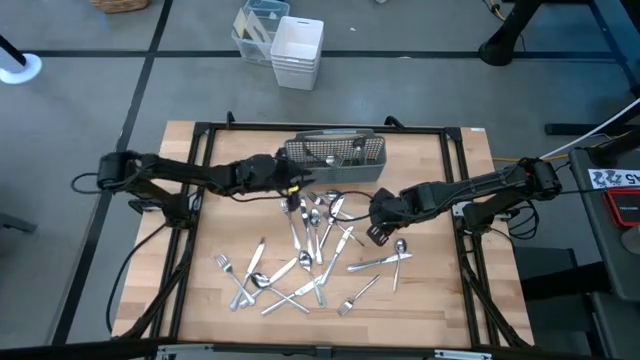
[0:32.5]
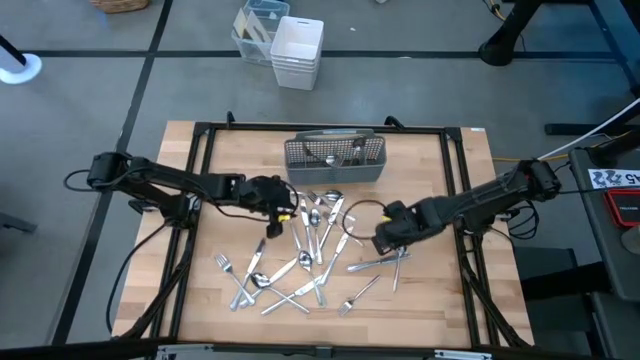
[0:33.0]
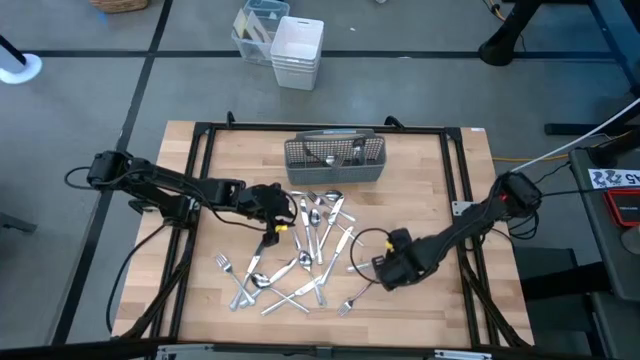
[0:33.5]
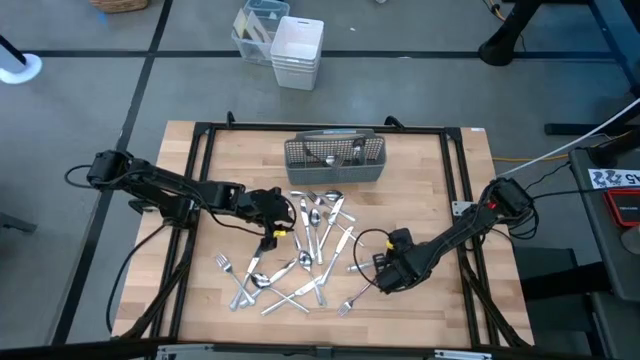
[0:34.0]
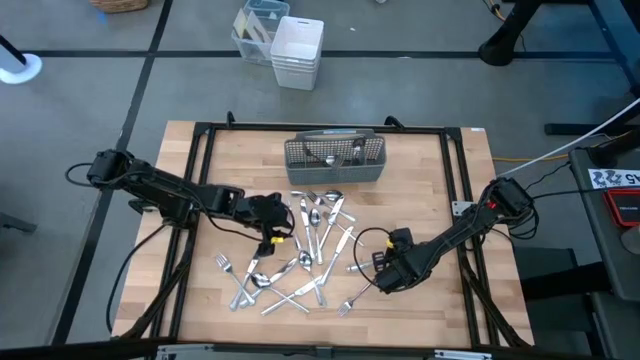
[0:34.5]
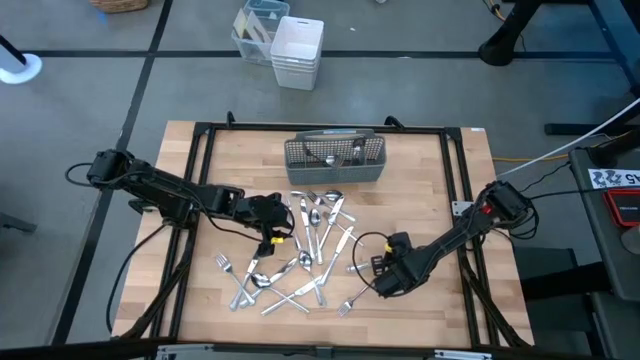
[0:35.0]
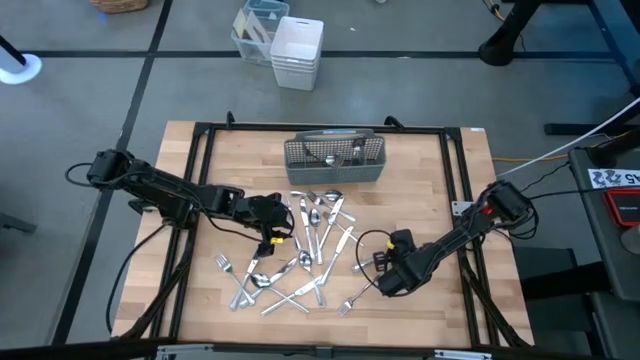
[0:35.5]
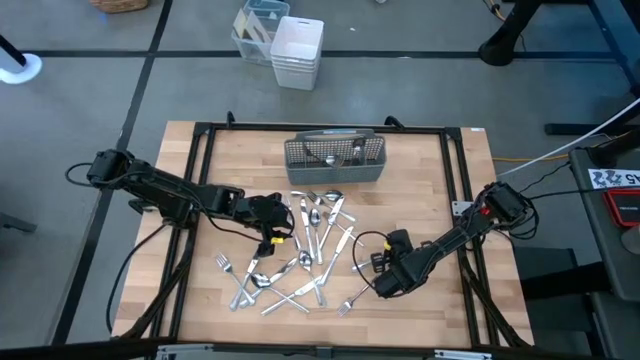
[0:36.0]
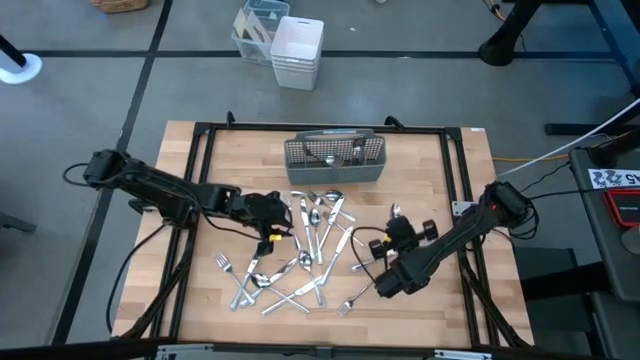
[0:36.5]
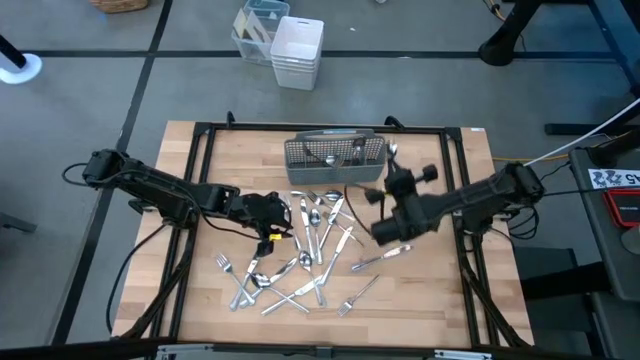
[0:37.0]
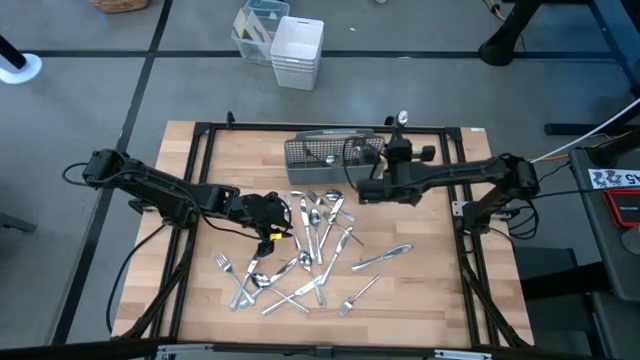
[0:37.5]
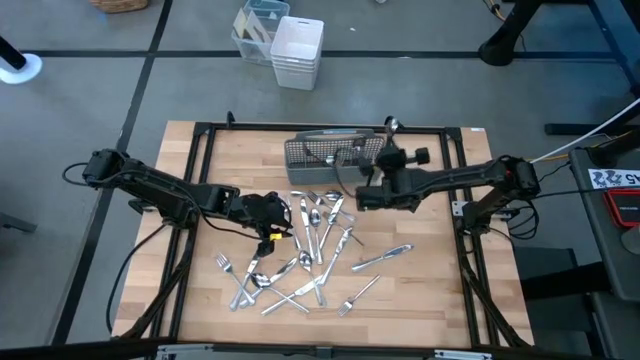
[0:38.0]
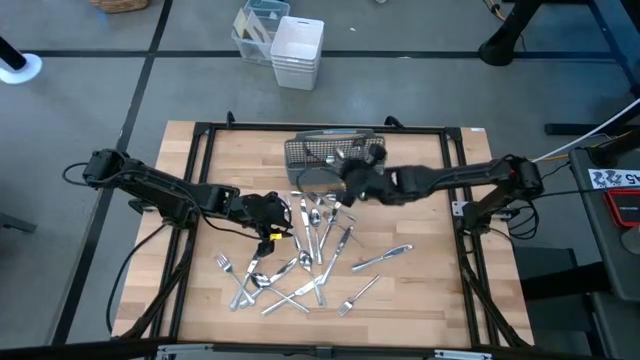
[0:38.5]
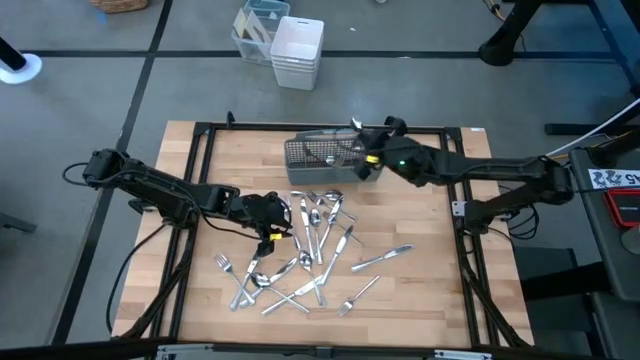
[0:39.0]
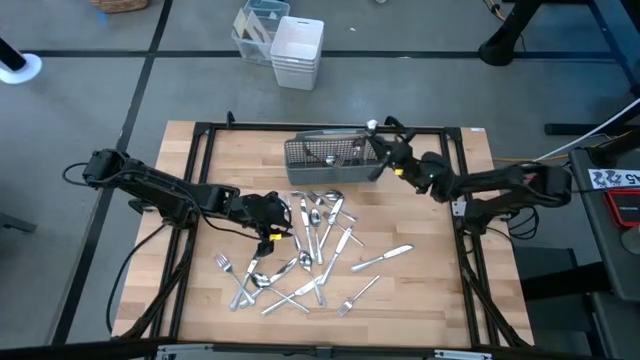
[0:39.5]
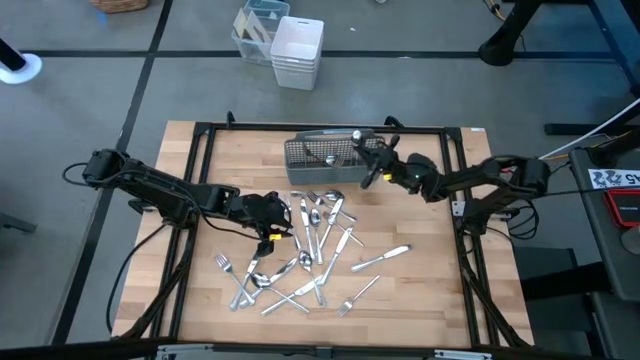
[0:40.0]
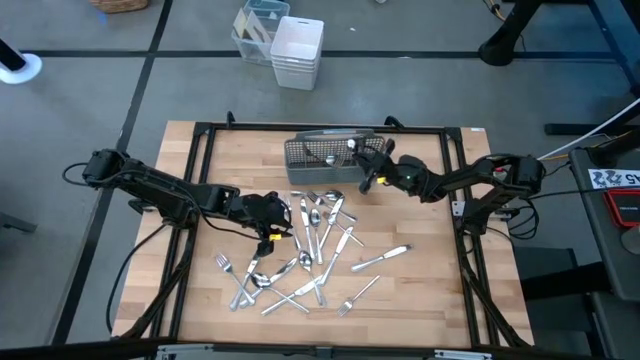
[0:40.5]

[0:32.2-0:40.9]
Task: Sort silverware
Put the spoon into the silverware rack

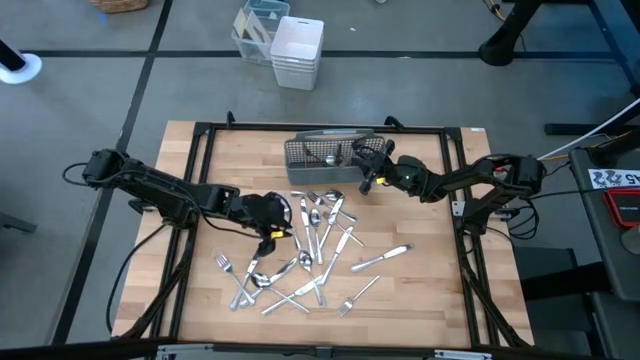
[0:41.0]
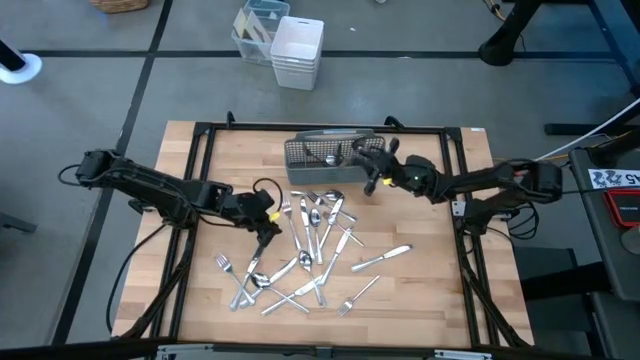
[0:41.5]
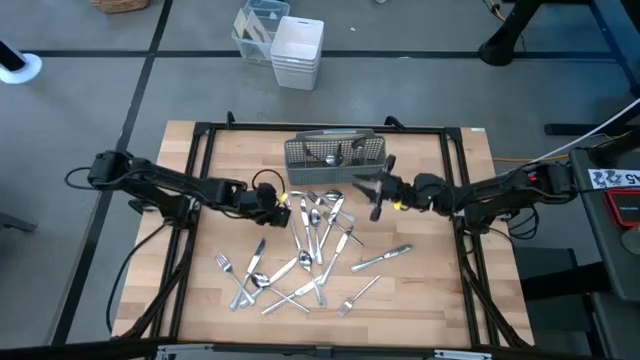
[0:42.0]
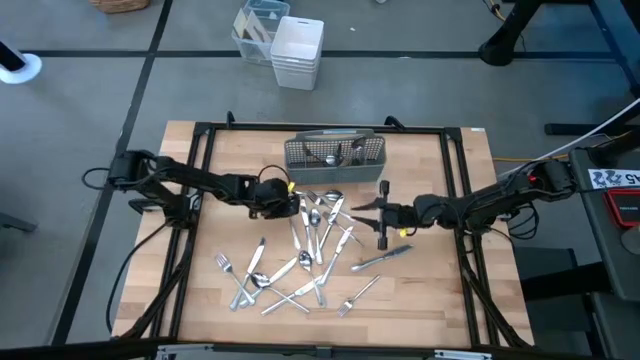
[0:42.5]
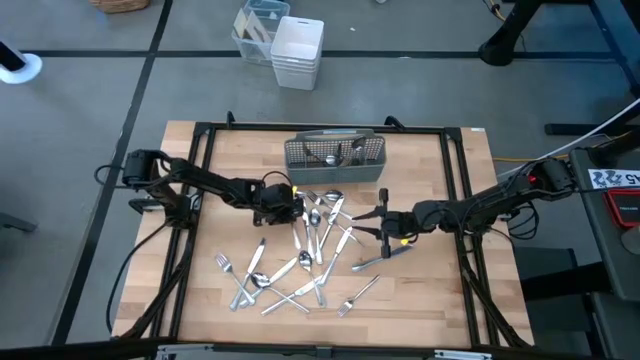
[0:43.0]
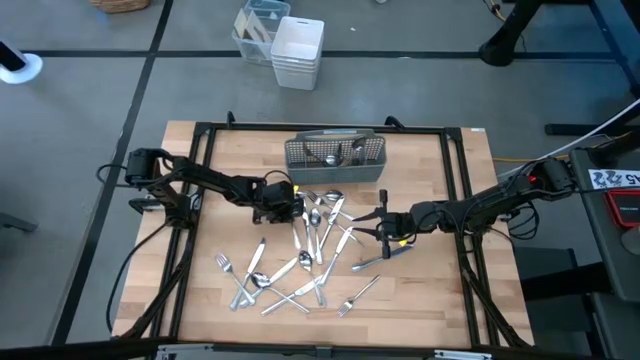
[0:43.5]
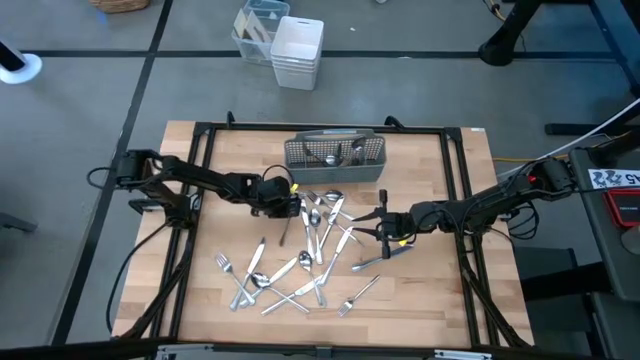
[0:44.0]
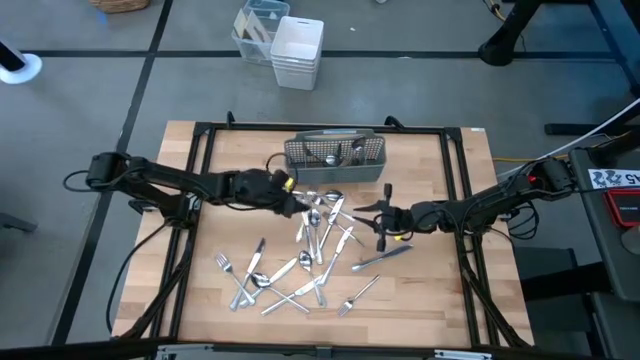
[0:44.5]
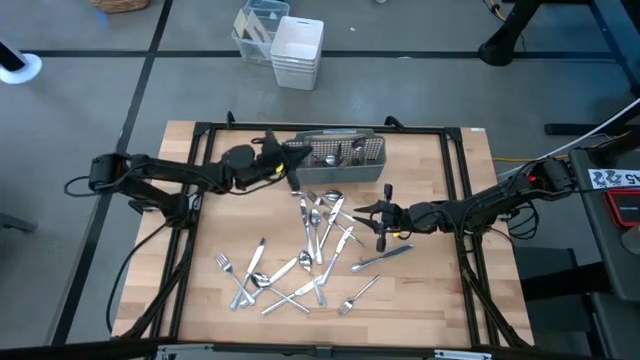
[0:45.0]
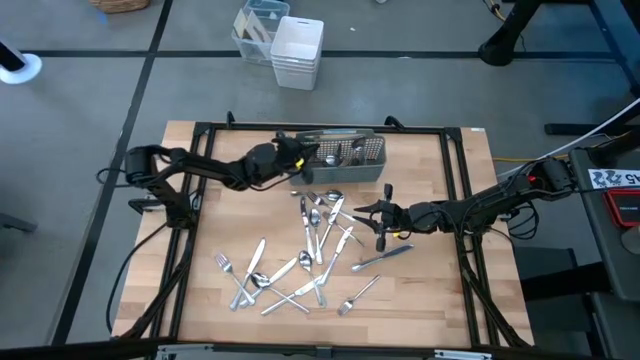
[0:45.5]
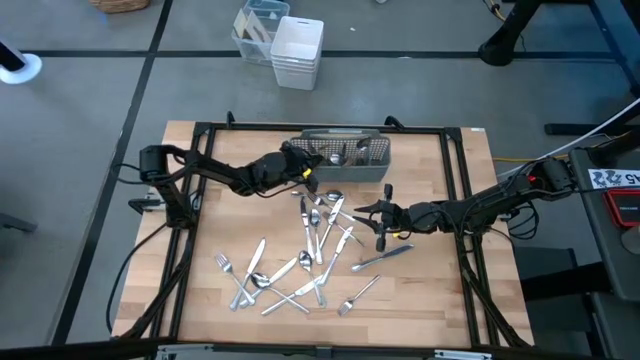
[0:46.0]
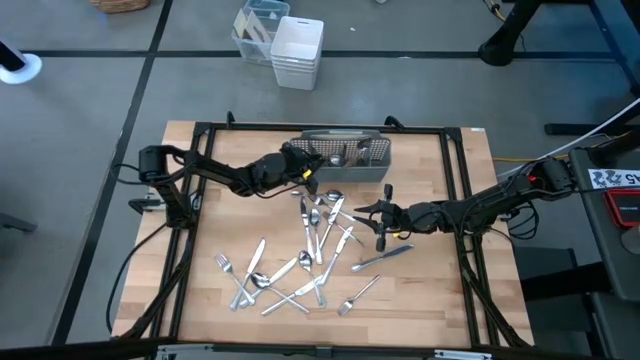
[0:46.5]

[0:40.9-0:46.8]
Put the fork into the silverware rack

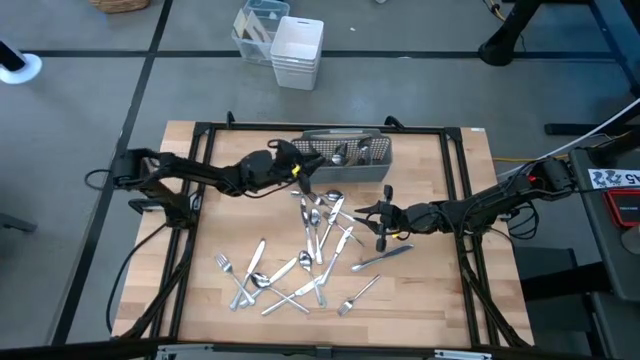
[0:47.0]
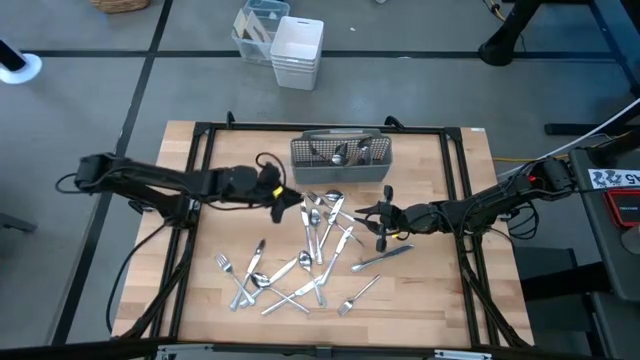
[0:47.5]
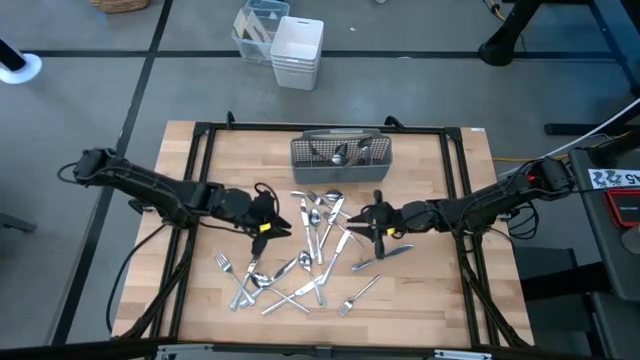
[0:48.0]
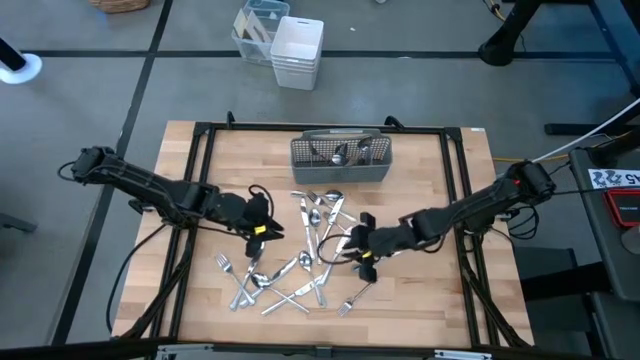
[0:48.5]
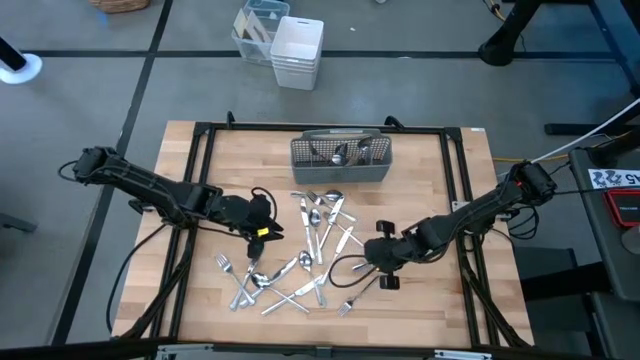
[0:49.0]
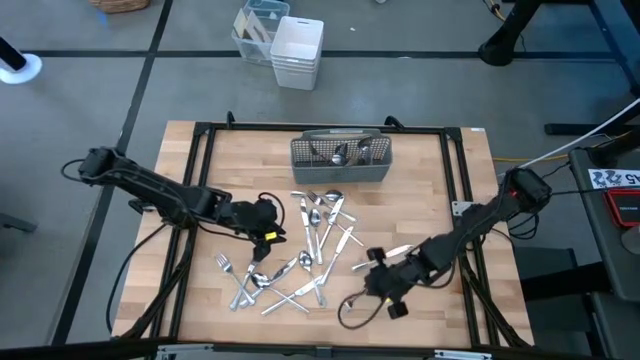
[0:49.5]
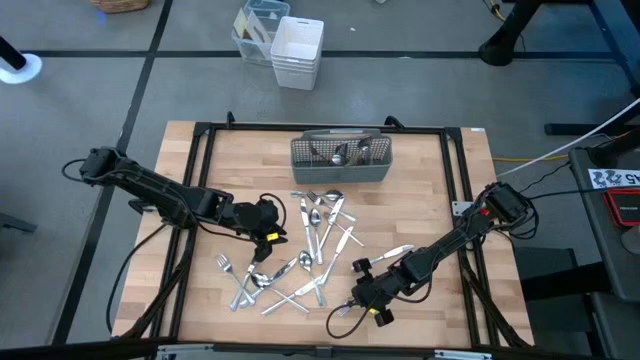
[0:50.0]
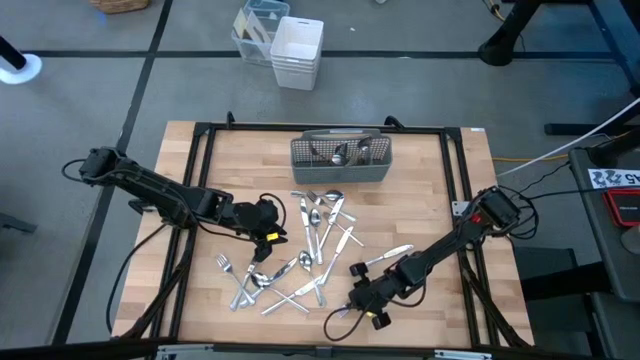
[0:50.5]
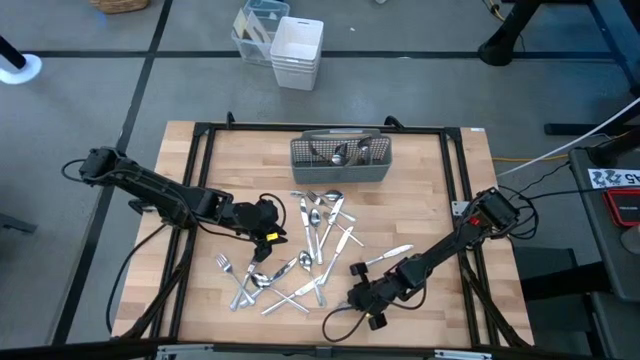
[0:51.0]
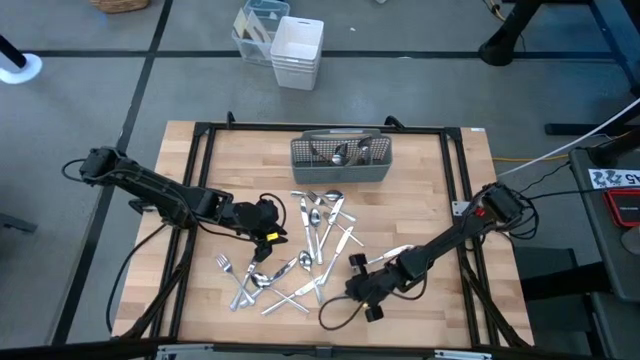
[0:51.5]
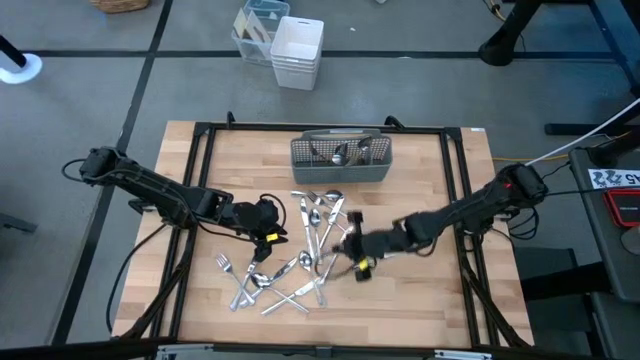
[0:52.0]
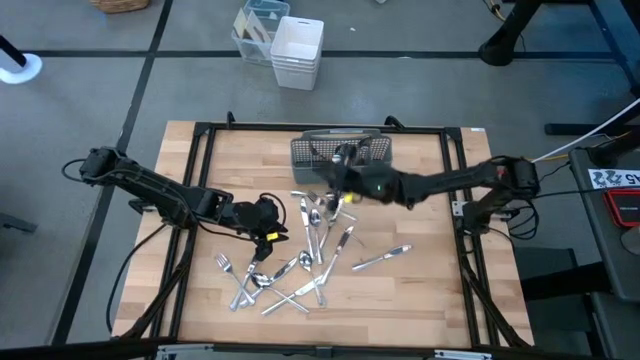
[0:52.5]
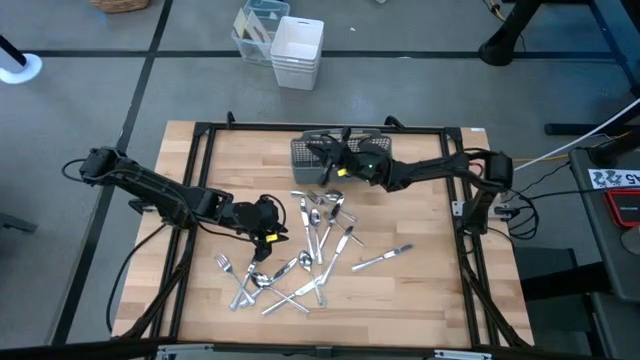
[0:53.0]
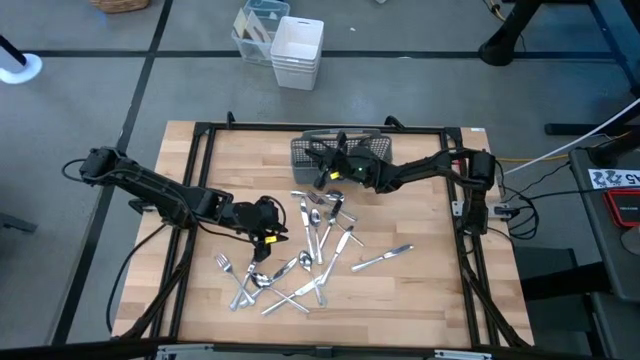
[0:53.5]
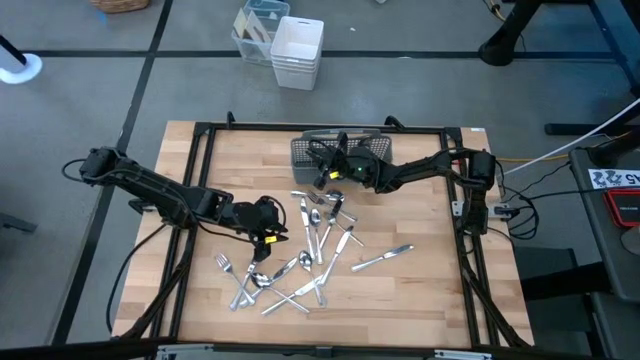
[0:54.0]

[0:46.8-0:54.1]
Put the fork into the silverware rack
